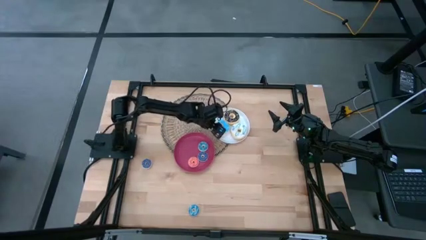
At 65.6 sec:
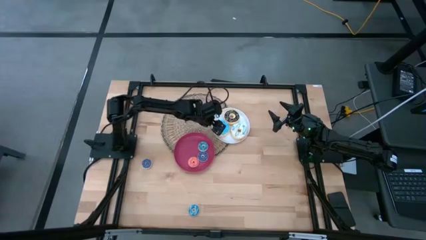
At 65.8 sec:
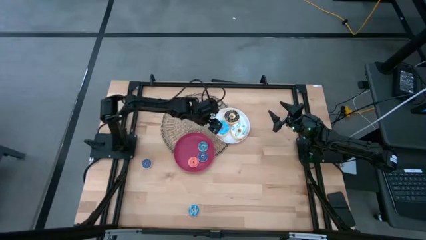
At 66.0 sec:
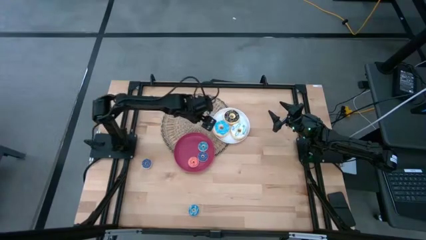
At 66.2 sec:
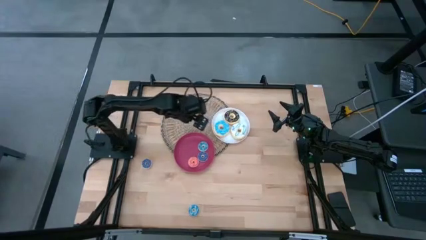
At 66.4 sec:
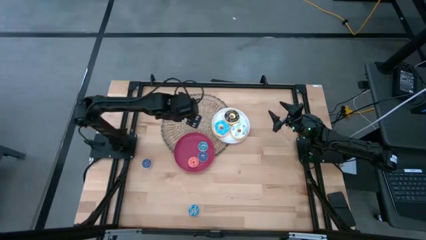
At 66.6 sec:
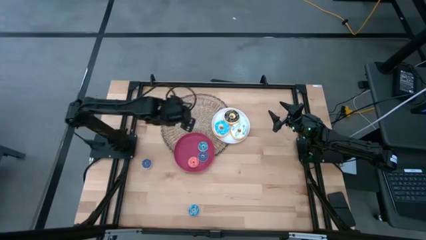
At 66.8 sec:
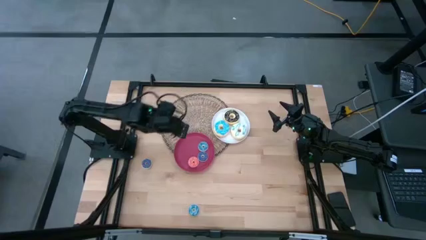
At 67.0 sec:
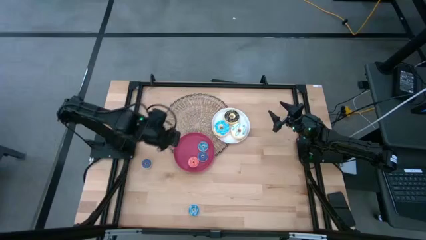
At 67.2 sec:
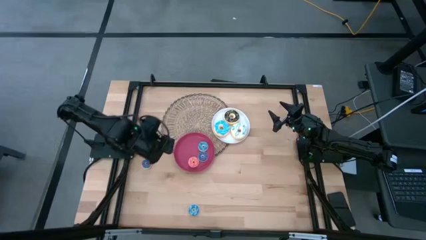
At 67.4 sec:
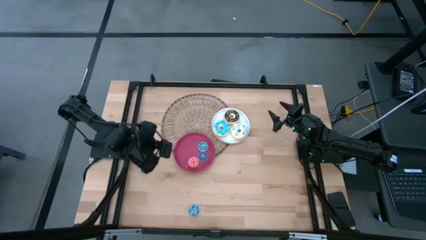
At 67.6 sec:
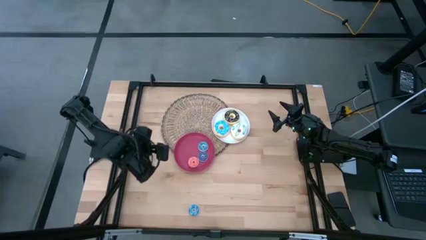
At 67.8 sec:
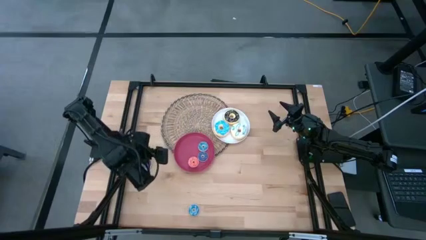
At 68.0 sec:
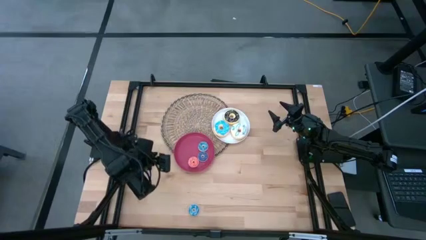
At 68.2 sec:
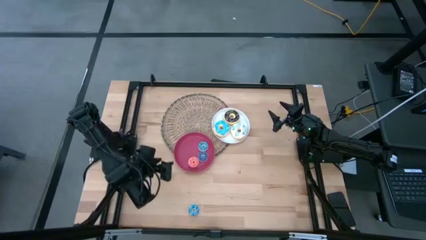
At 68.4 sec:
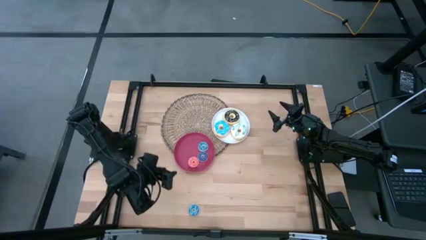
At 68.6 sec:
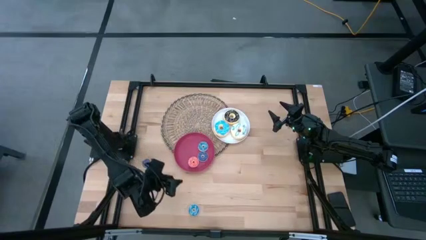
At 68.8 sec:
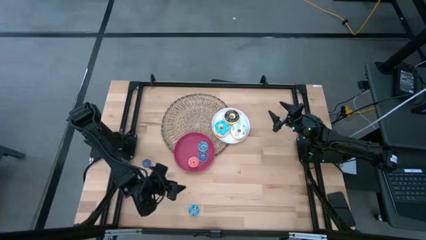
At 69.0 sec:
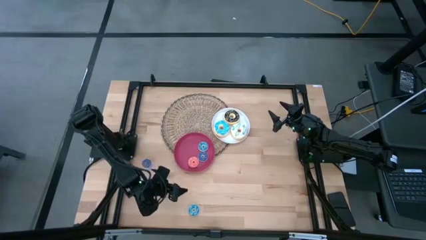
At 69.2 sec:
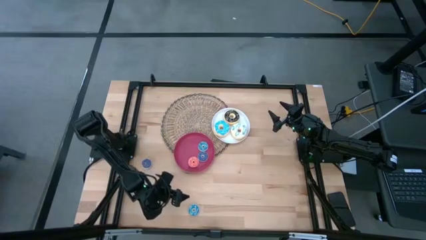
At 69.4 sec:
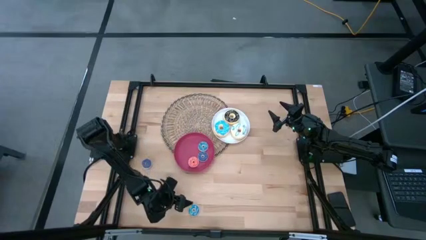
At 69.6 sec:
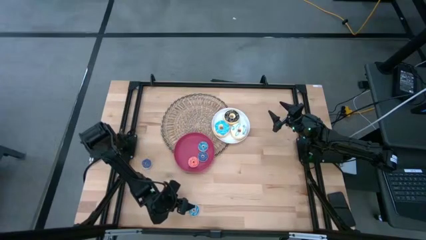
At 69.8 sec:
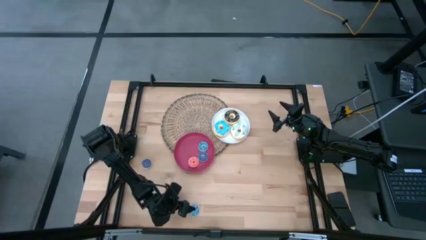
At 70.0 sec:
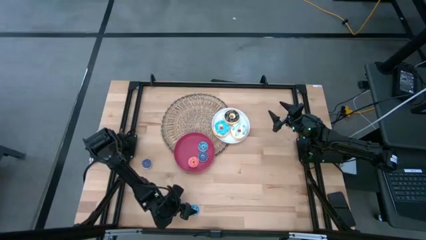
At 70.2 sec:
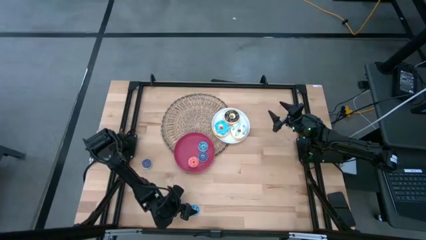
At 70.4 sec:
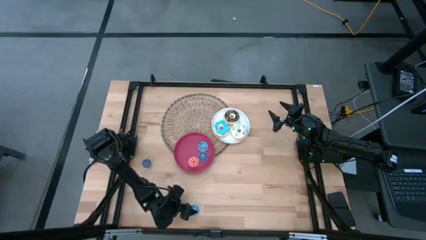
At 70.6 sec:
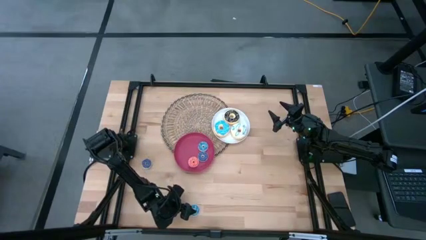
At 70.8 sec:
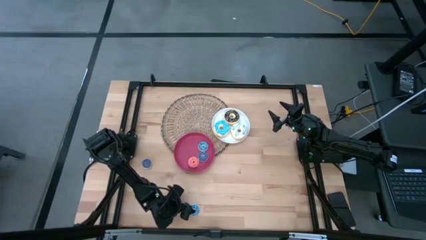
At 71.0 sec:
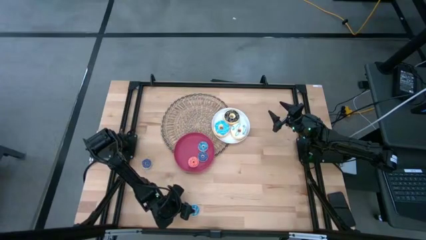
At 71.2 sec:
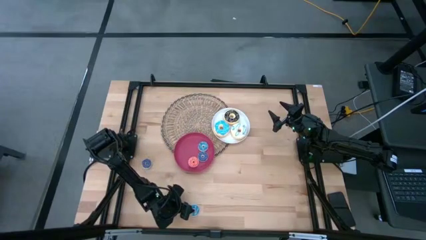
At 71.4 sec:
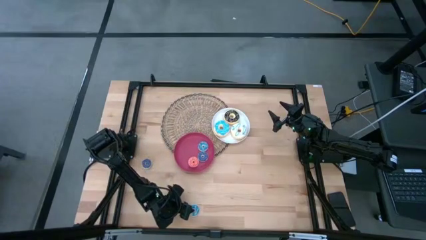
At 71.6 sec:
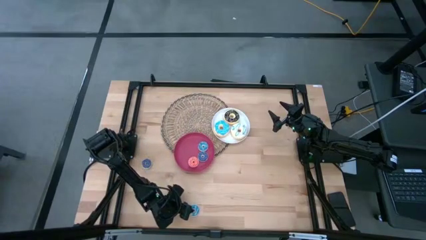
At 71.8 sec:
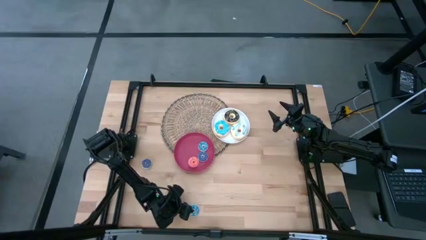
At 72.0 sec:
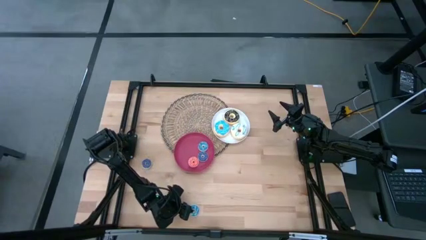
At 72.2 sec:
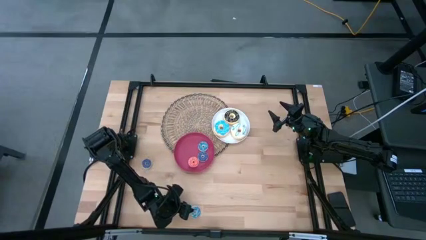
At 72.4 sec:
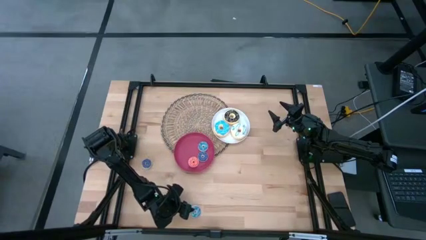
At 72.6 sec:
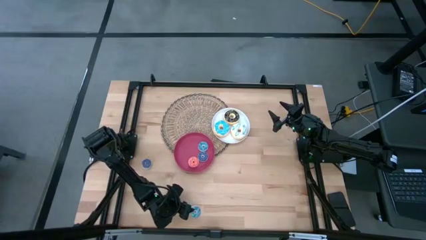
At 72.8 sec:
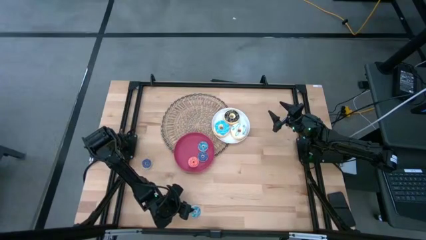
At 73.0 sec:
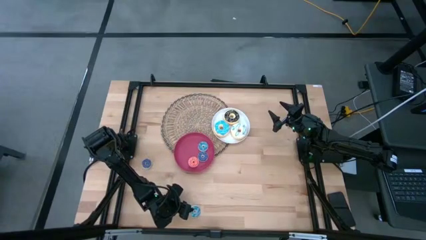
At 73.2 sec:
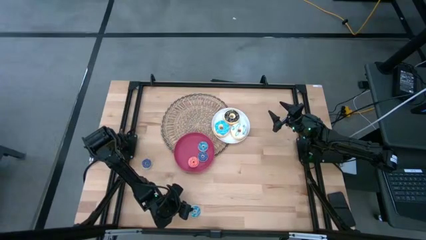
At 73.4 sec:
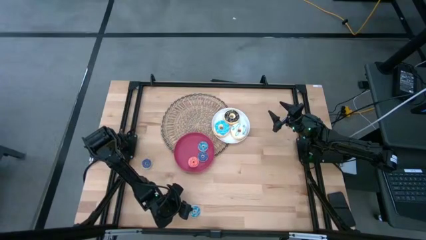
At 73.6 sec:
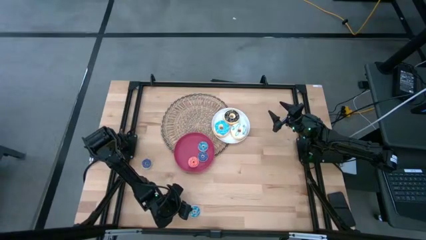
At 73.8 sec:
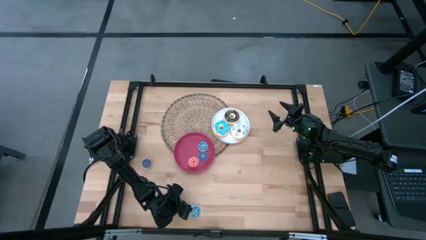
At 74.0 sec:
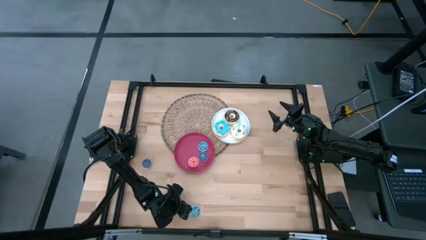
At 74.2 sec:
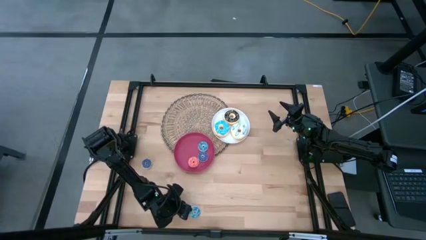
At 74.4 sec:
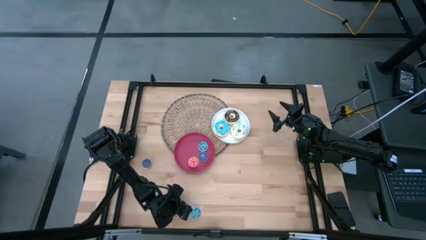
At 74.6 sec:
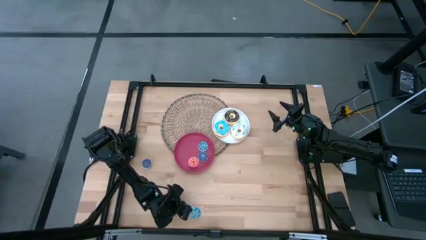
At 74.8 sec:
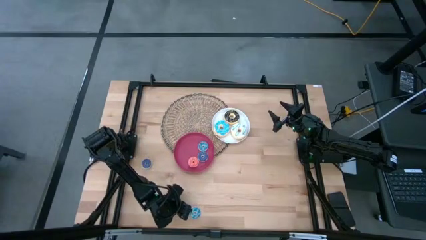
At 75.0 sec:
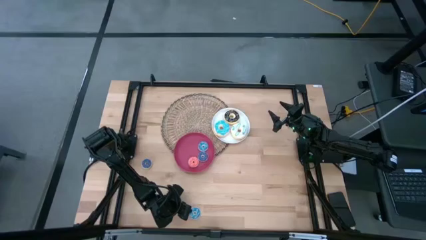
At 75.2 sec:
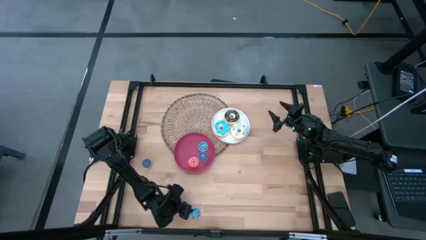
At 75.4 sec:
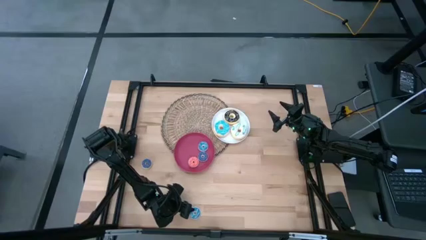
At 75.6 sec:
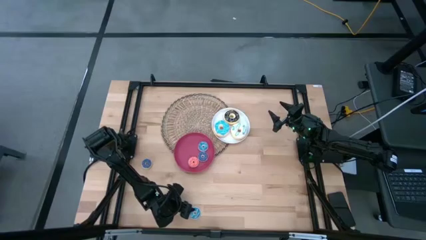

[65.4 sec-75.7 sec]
Task: Pick & Place donuts
Put the small light blue donut on the pink plate

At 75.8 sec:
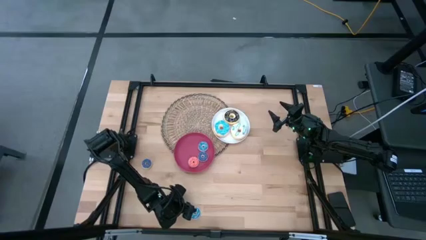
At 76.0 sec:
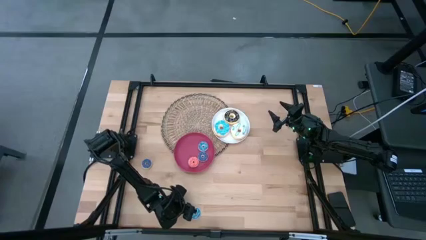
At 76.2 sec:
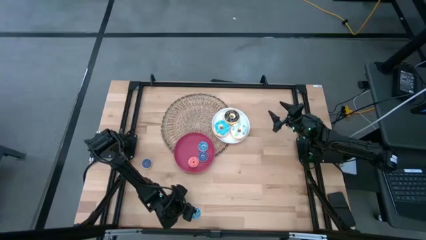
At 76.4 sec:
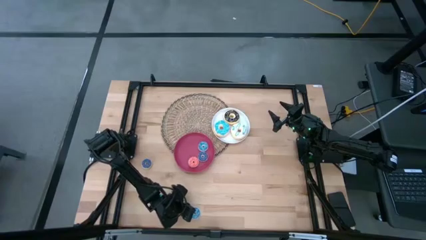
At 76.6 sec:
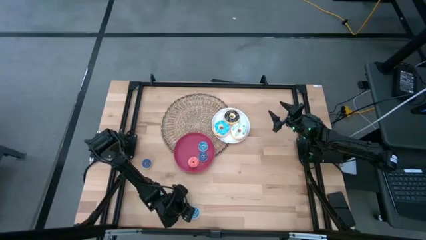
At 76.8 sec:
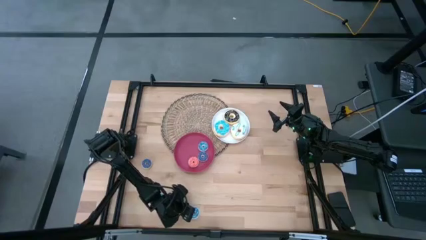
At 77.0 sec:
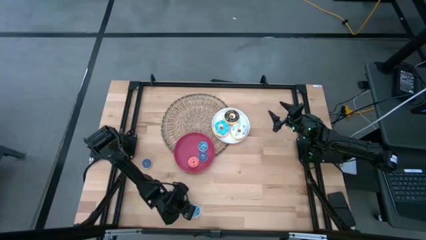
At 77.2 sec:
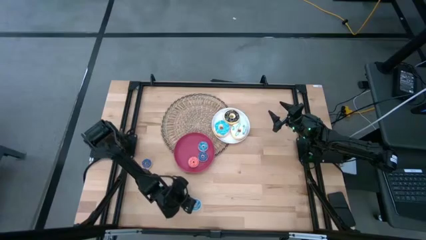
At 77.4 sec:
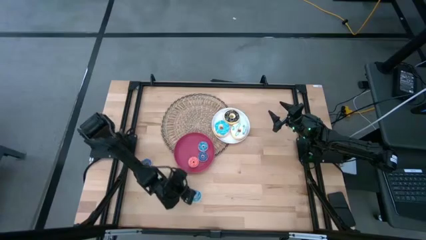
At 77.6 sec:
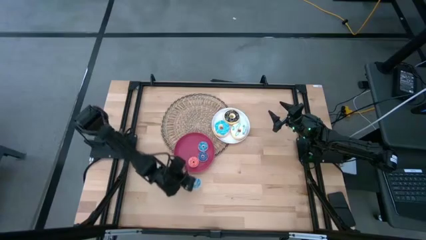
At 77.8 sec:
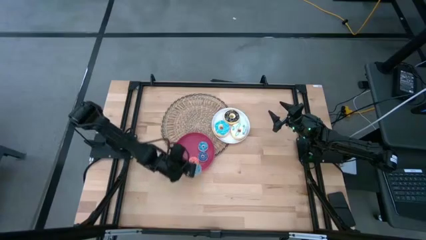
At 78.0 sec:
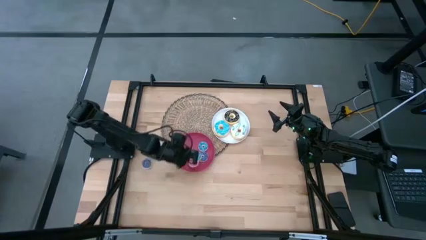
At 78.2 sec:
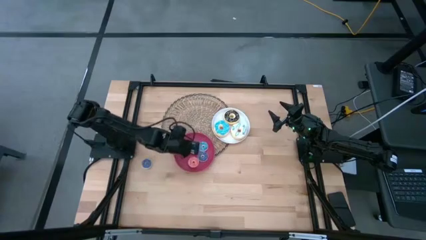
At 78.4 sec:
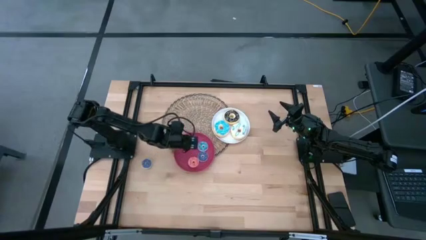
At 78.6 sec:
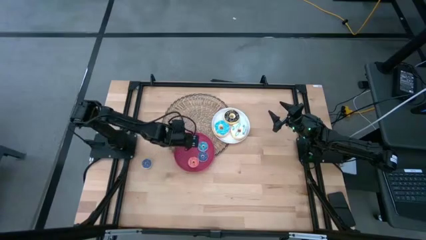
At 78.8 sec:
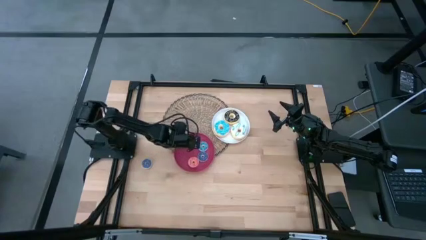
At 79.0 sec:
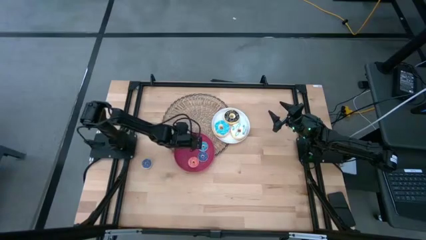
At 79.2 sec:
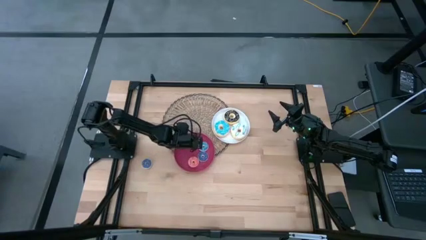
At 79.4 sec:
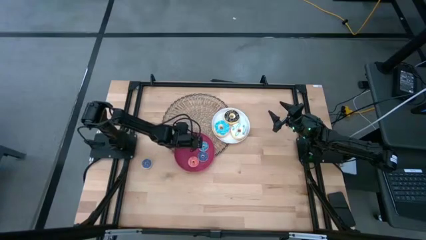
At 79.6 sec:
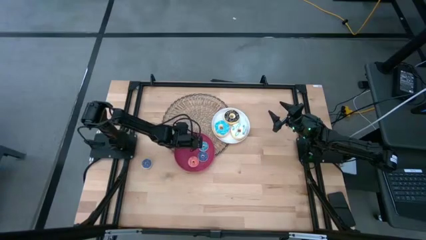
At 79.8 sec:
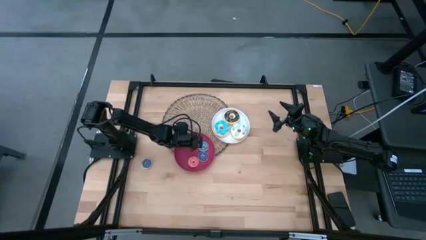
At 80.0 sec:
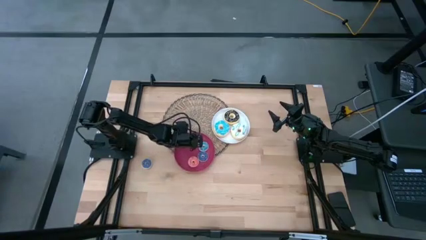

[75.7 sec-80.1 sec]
Put the small light blue donut on the pink plate
